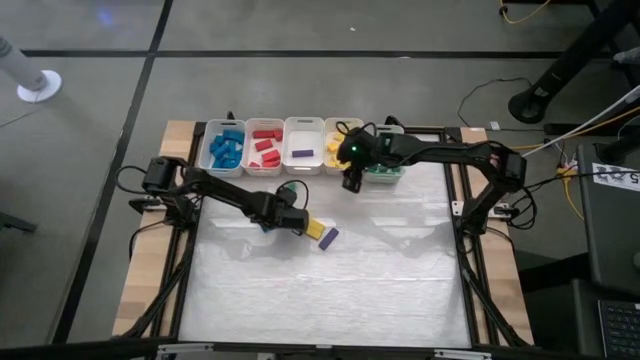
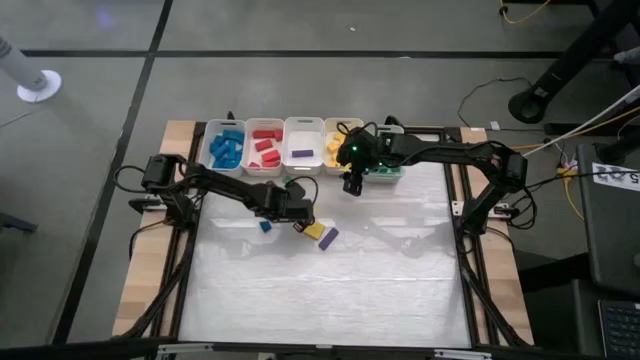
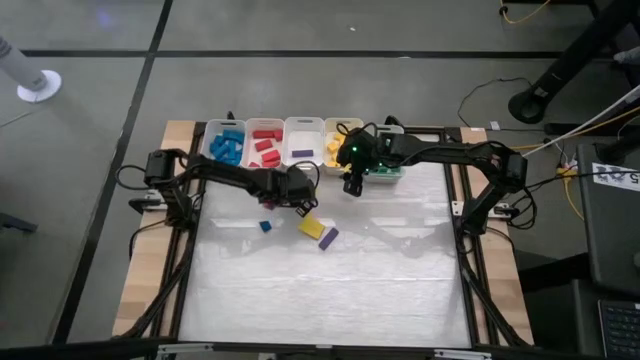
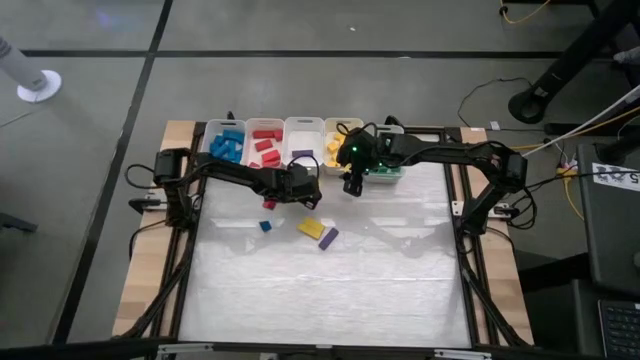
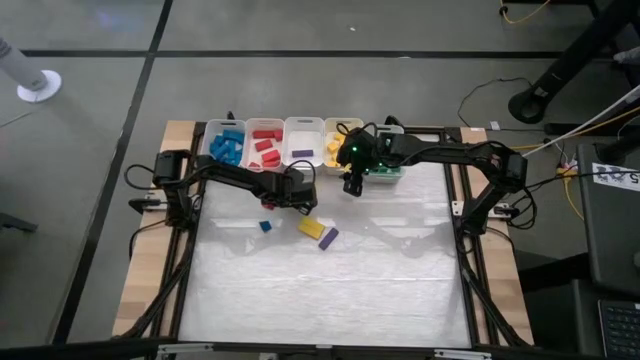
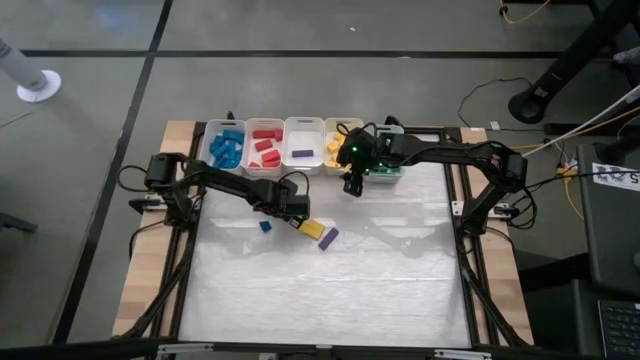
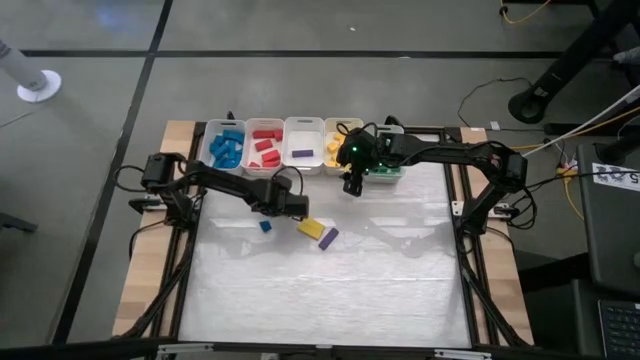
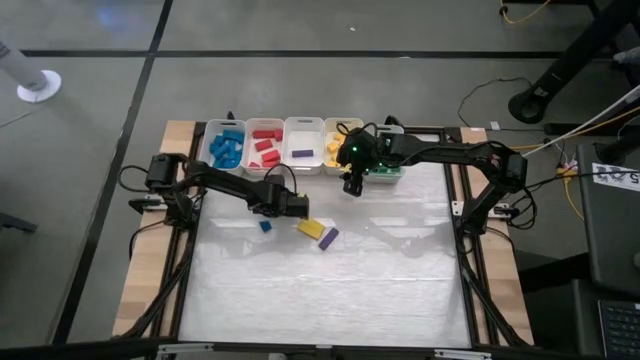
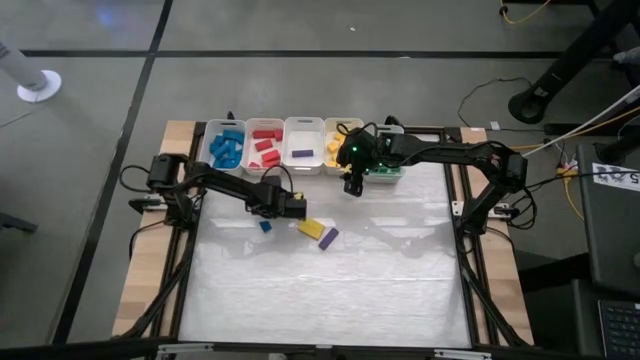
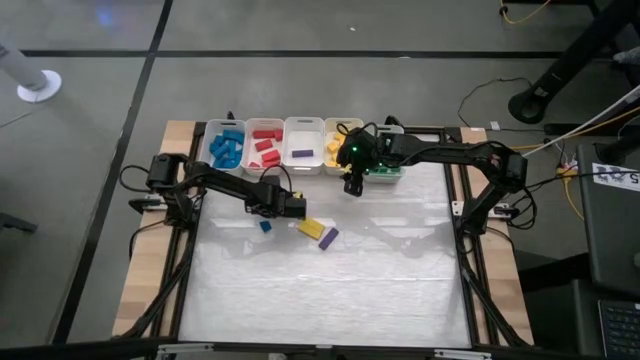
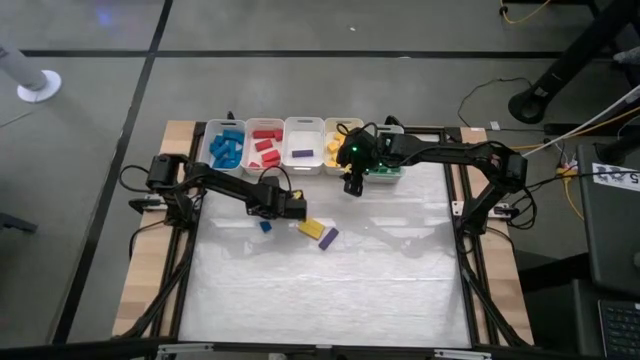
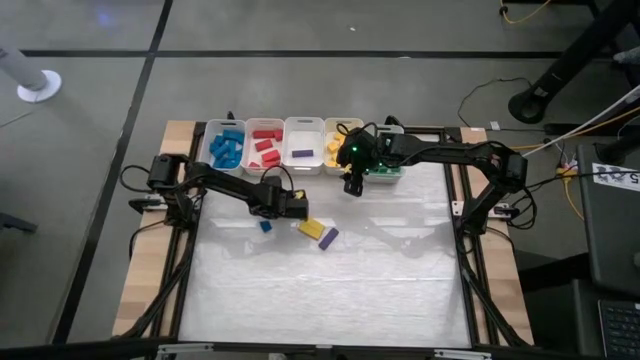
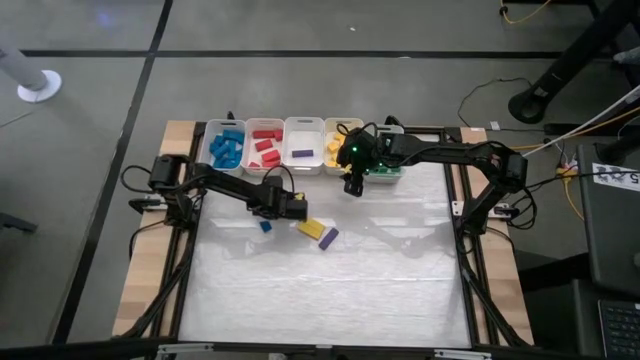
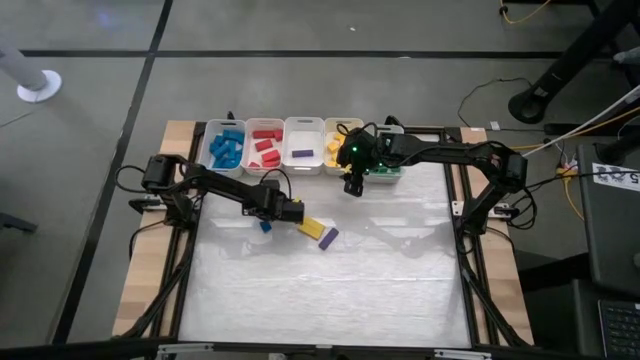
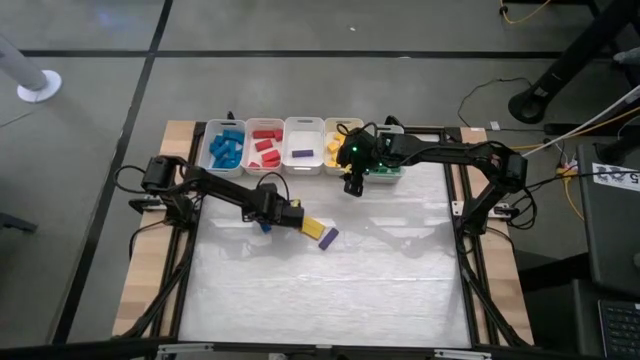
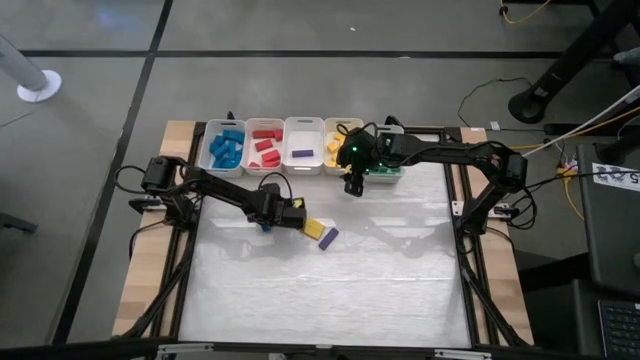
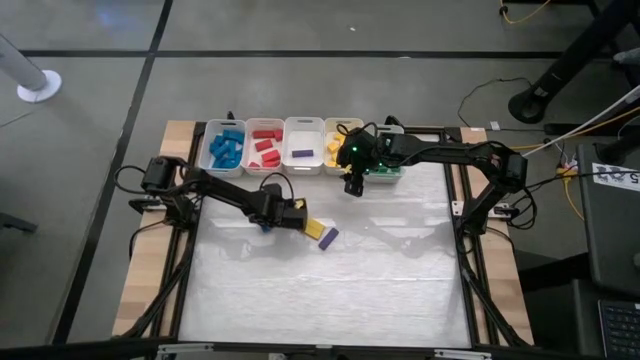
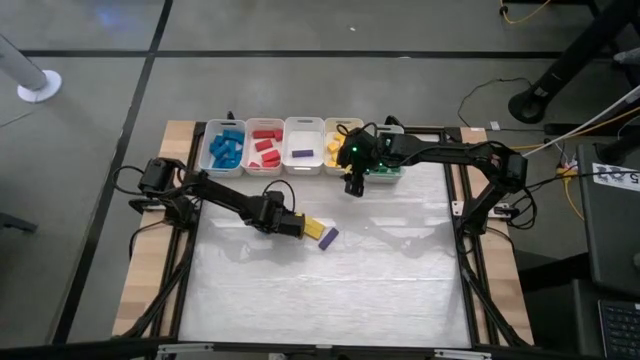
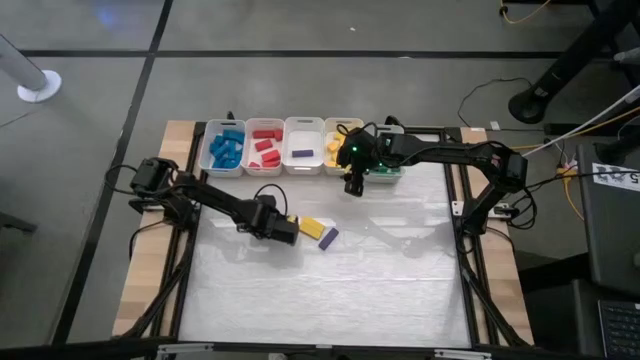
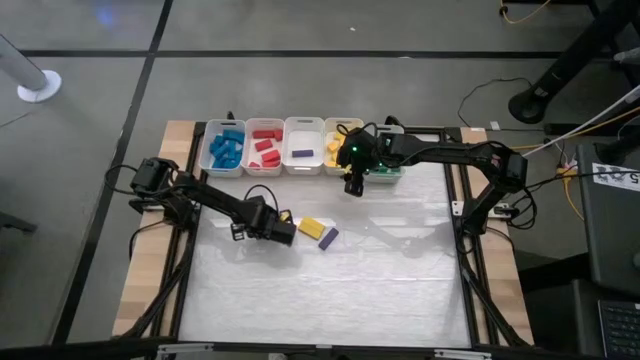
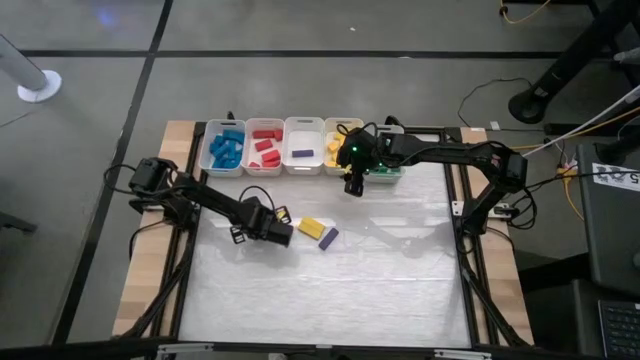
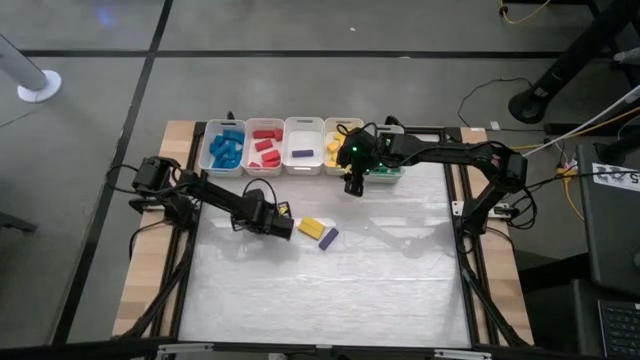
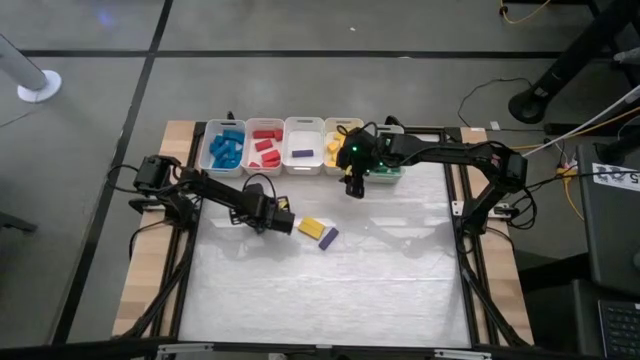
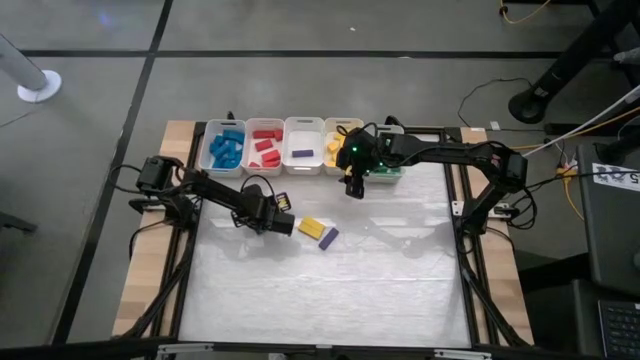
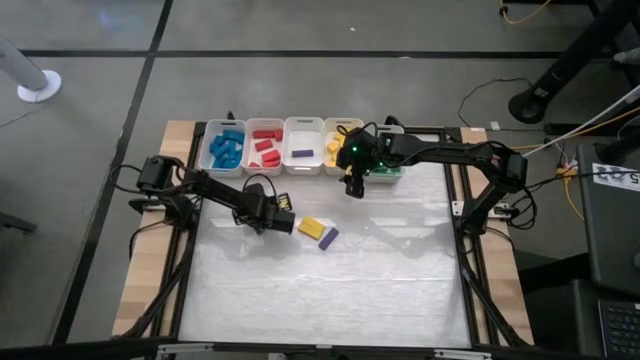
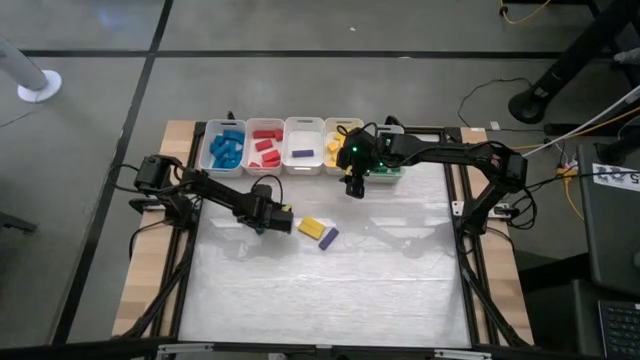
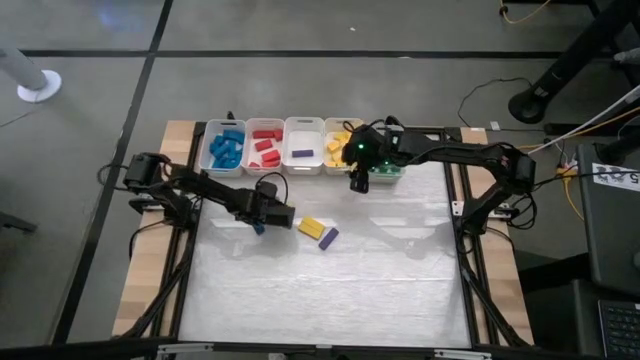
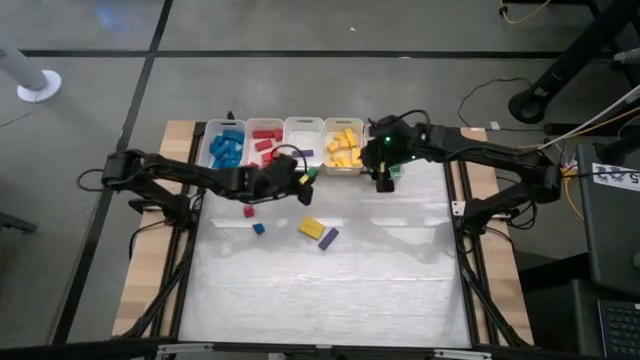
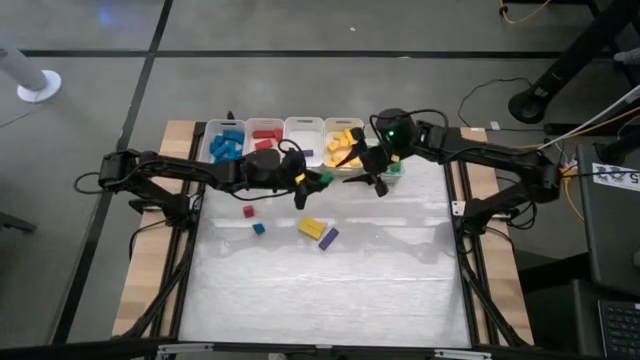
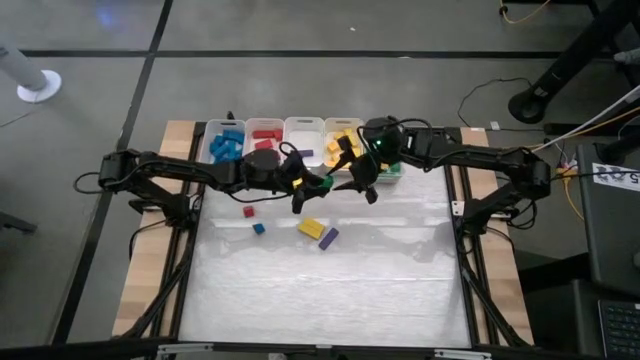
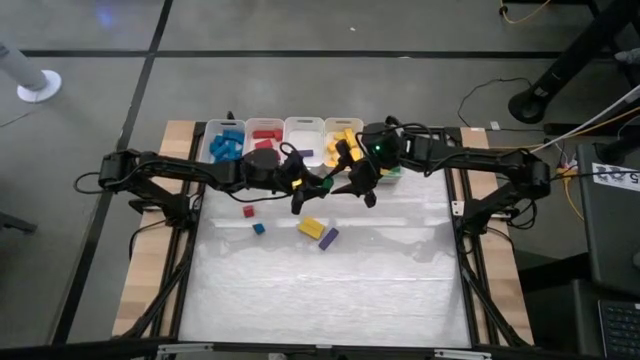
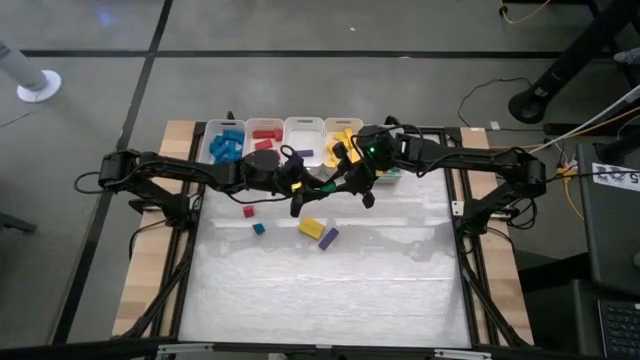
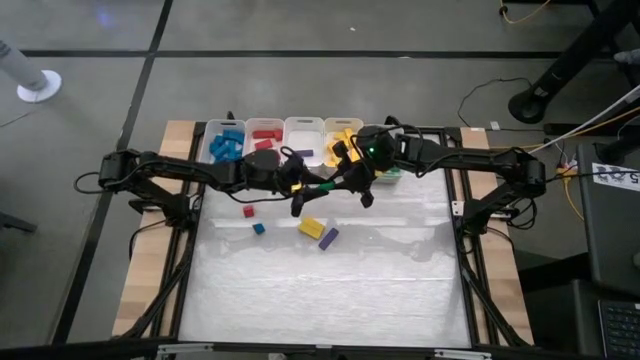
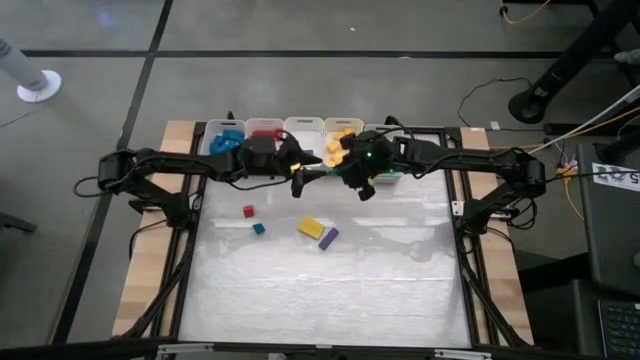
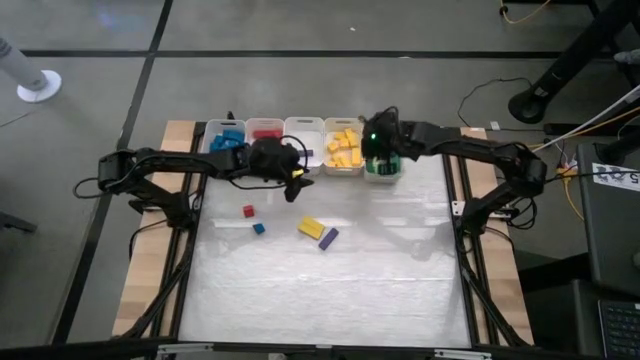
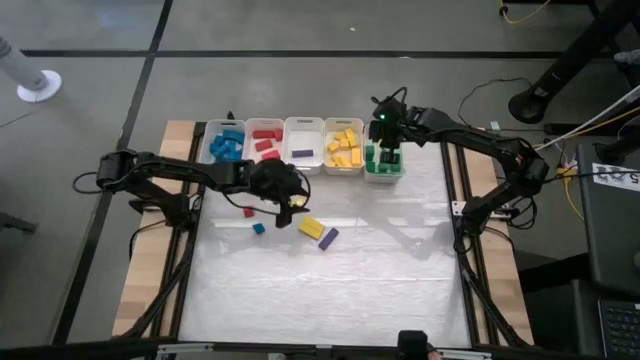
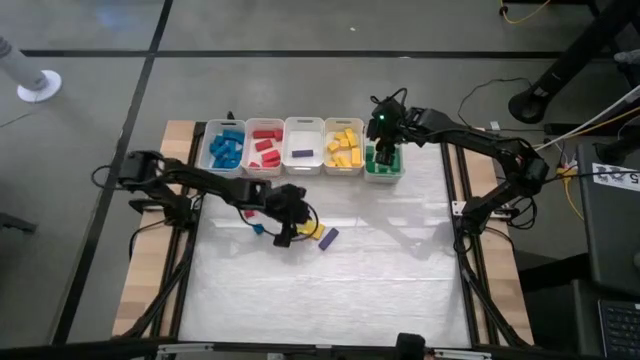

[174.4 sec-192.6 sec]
Task: Sort blocks
Put the green block into the right white bin

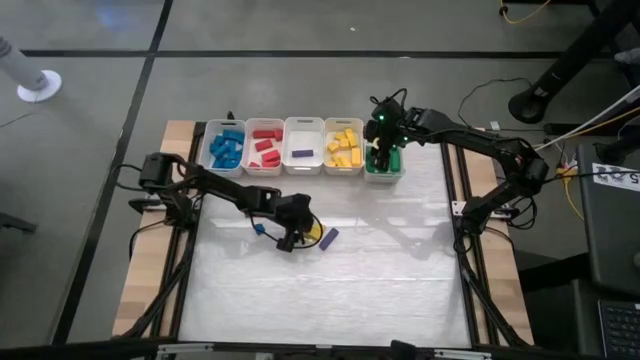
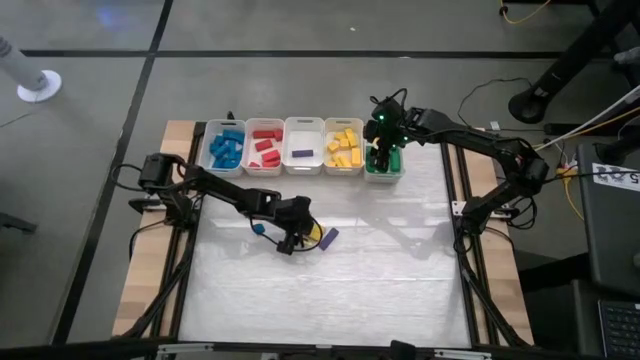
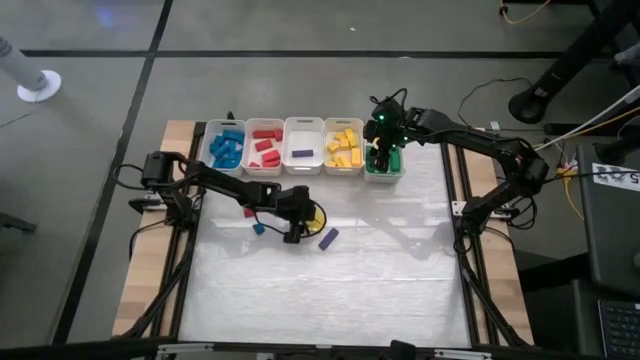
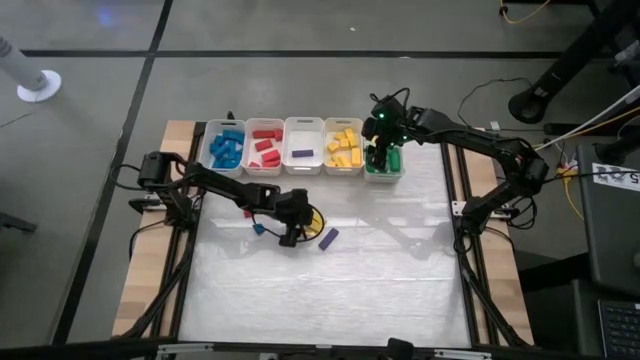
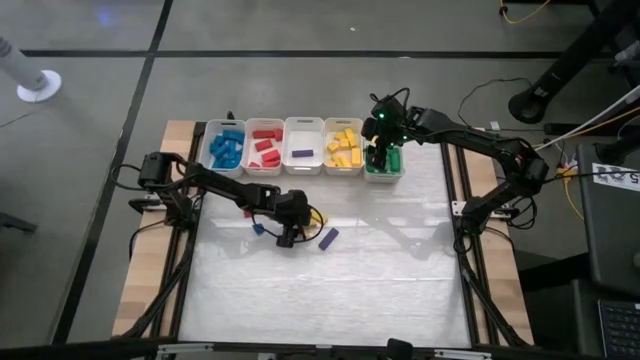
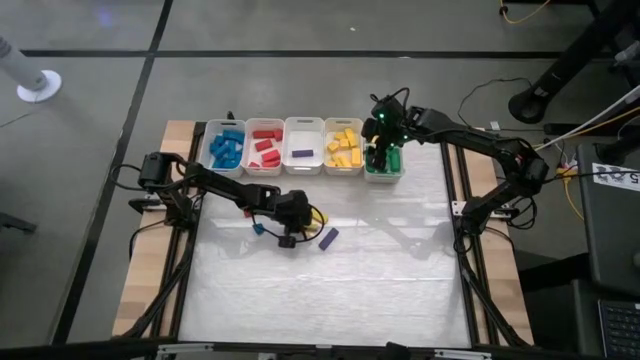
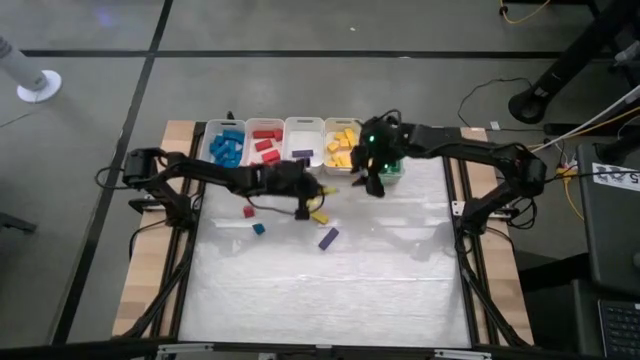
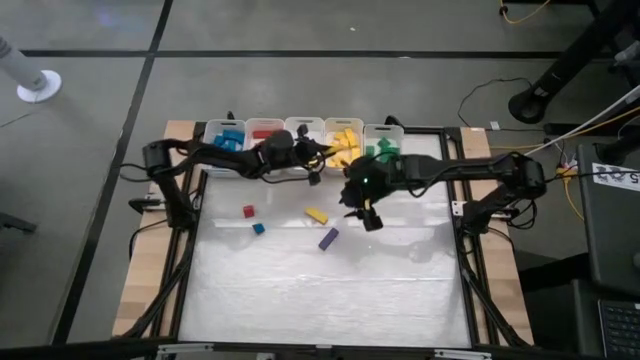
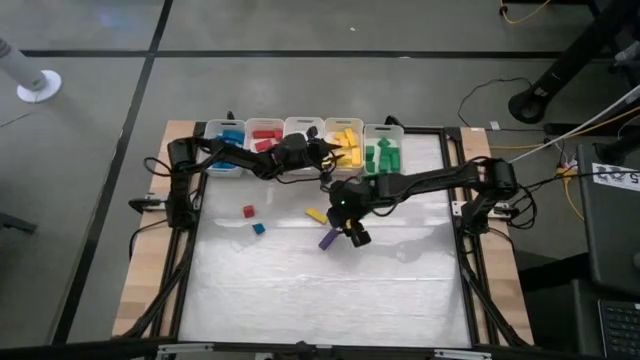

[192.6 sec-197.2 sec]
Put the yellow block into the middle right white bin
